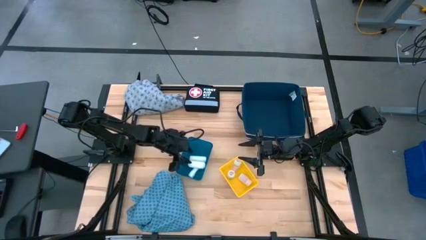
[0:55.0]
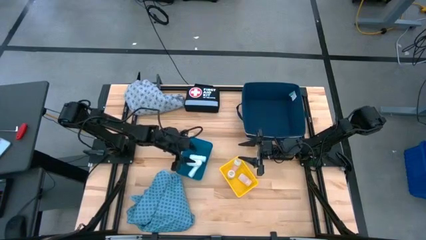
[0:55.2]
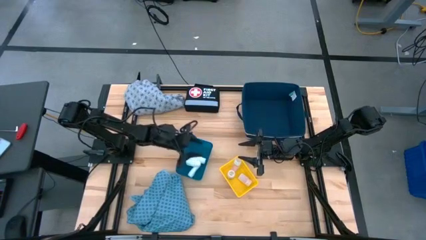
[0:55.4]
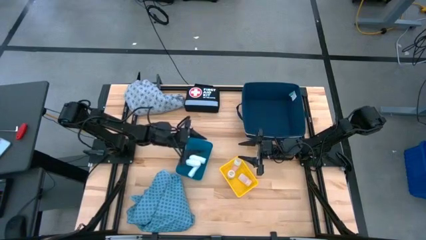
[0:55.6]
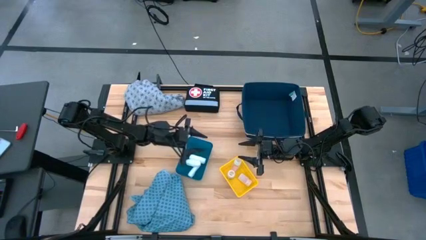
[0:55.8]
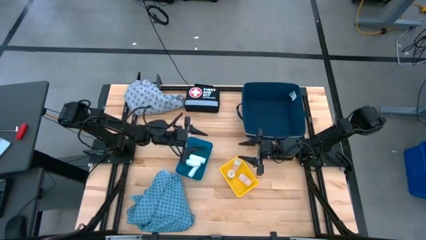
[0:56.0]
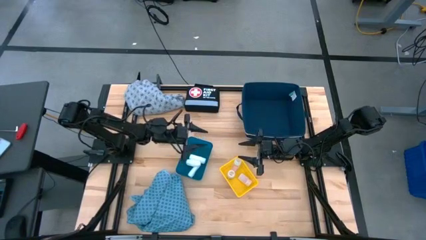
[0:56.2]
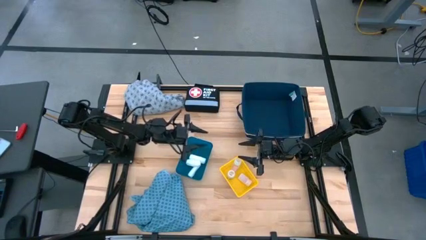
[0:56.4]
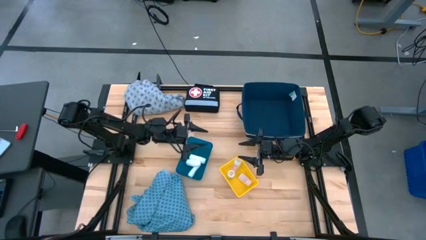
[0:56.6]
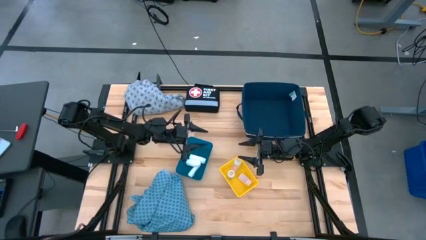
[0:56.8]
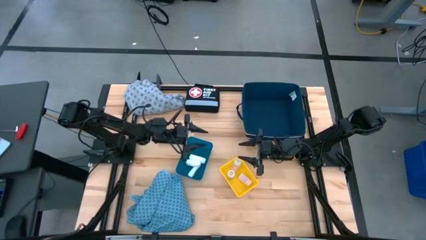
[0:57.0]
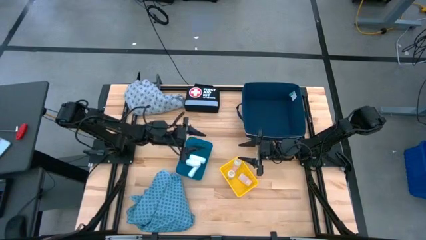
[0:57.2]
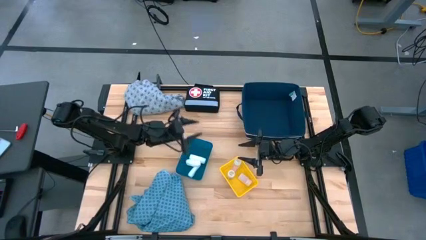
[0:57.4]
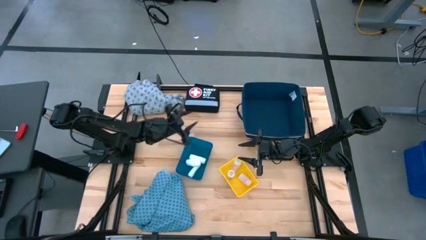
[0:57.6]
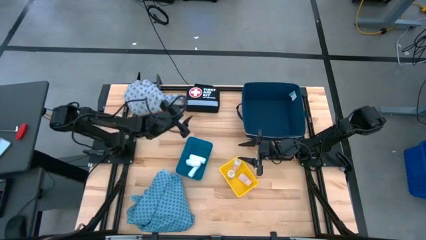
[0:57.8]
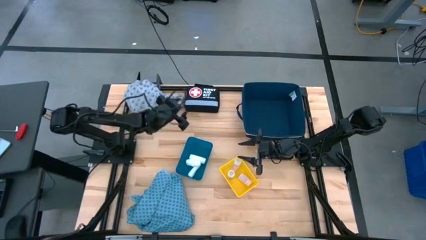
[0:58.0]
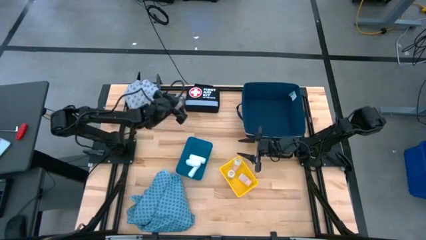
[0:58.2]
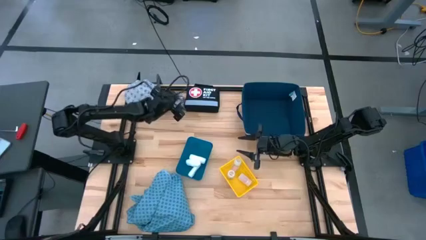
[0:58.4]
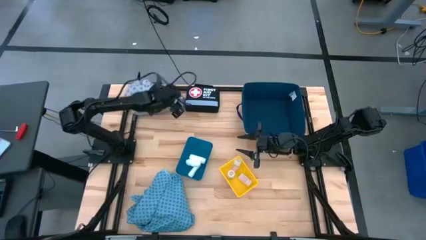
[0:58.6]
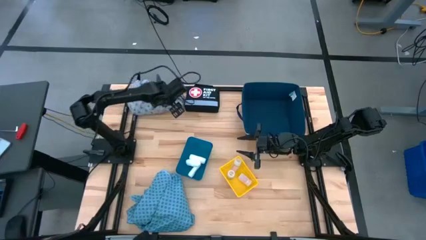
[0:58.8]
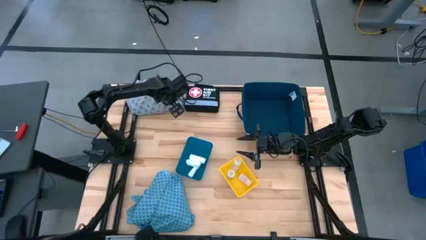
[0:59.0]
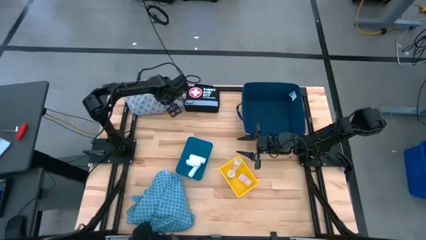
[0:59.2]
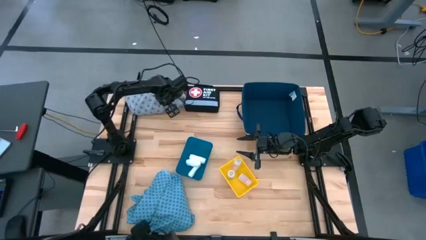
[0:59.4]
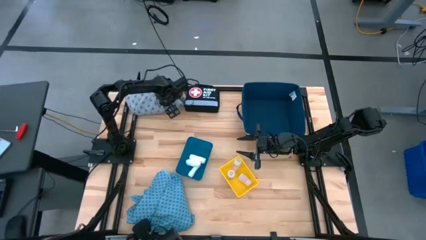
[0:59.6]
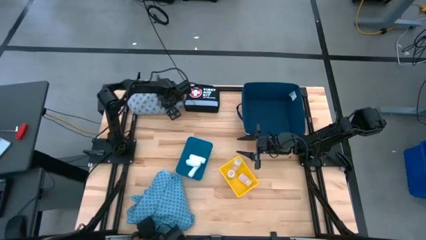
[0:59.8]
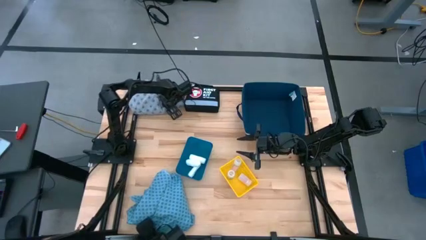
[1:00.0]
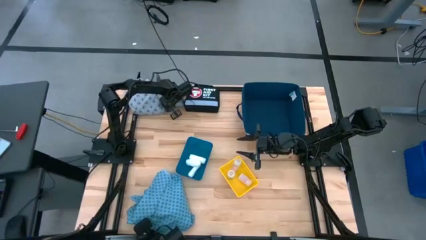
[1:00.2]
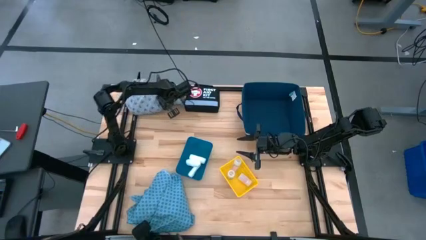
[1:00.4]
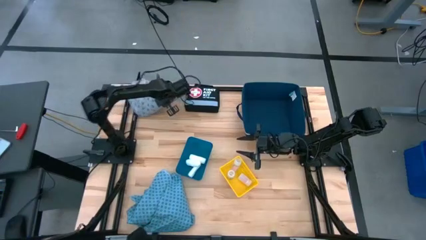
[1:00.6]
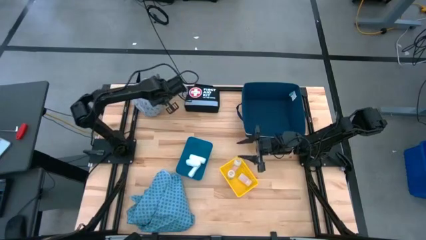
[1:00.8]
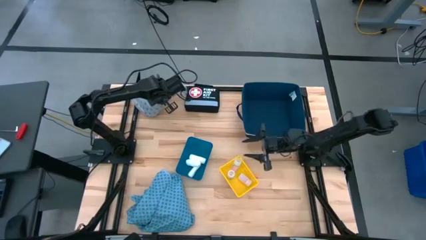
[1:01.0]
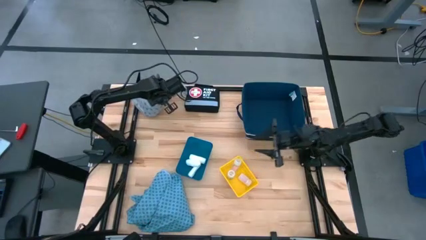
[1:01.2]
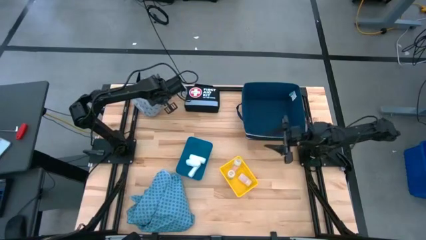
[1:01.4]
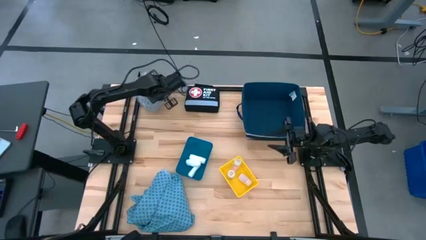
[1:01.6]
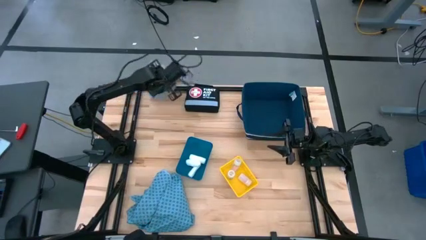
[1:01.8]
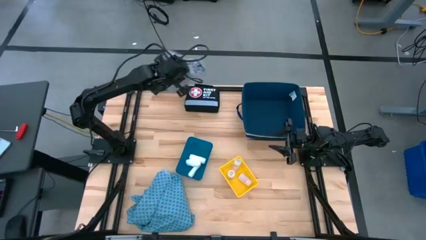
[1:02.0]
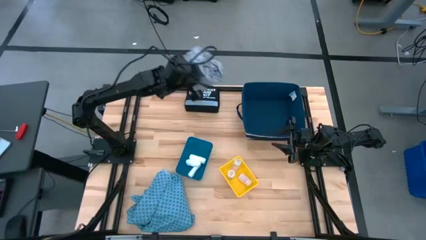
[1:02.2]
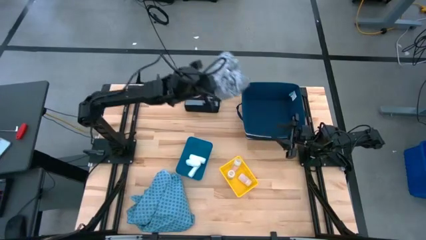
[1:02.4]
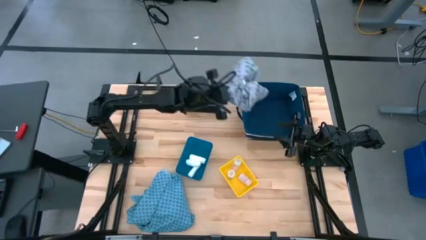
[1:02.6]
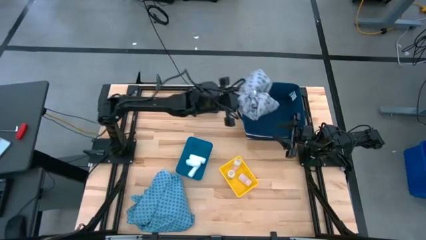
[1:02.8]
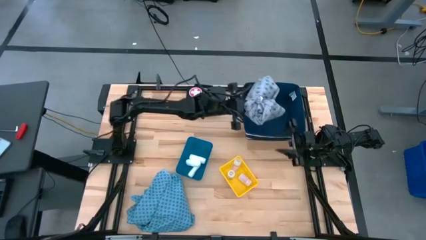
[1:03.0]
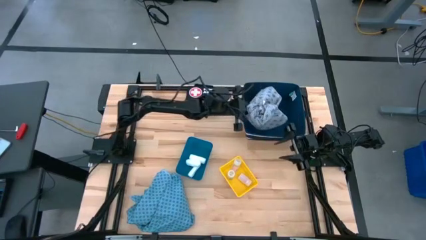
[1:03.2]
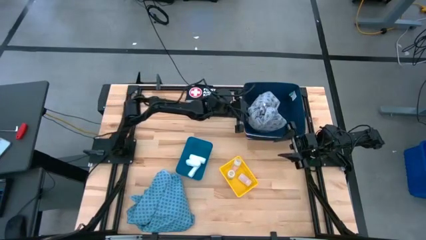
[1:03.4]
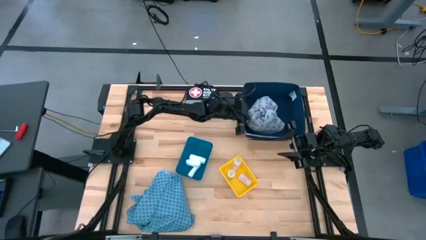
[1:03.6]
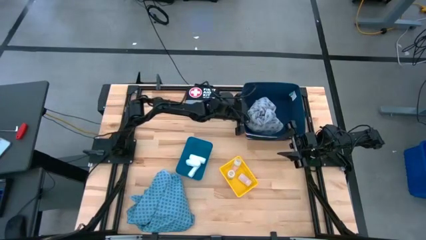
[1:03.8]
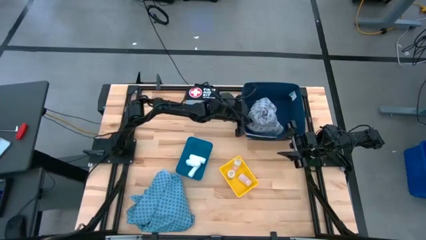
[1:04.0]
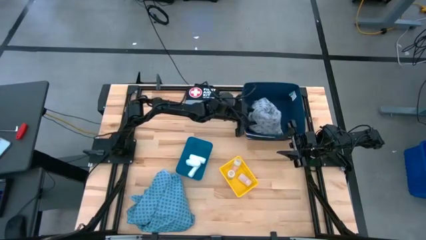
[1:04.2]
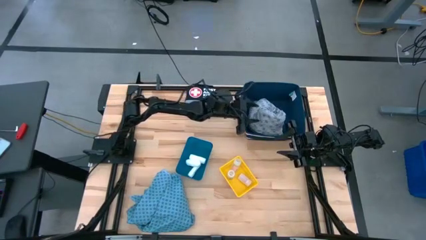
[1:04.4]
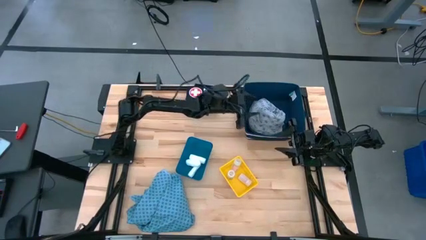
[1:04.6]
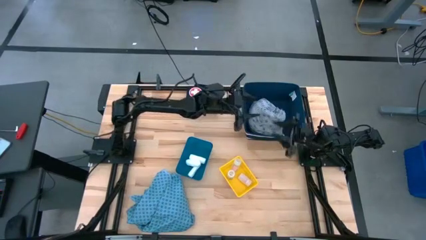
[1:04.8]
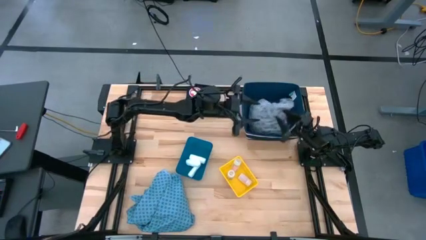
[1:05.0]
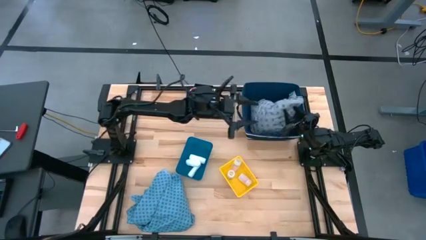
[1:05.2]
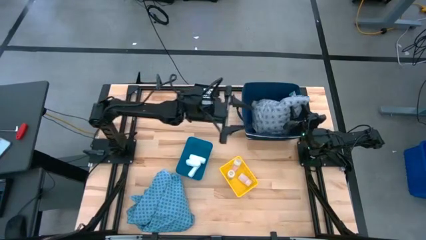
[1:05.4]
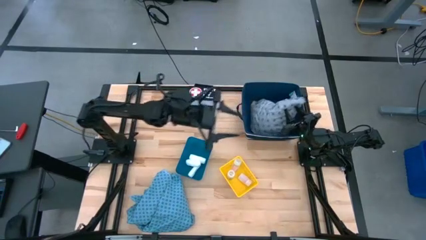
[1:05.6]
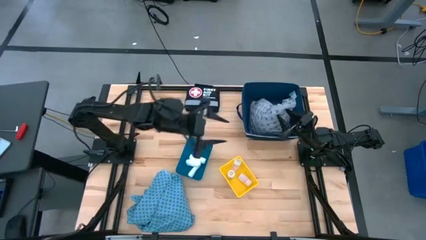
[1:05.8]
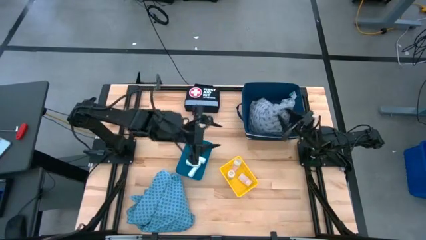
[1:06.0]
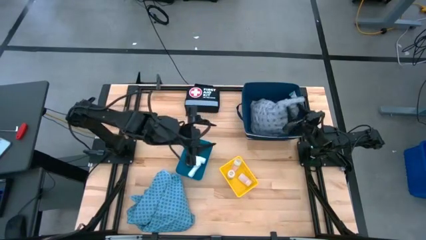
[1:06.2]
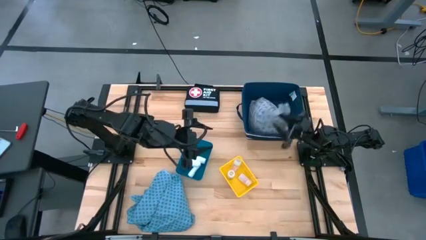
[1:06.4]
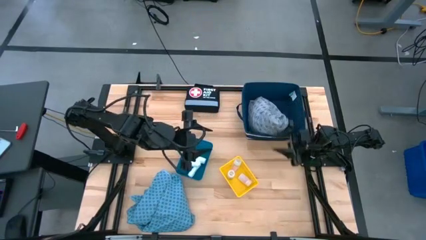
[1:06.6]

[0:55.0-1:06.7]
Task: Pick & place medical supplies in basket/bin
Put the gray patient gown into the blue laundry bin

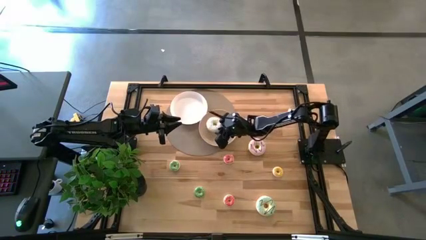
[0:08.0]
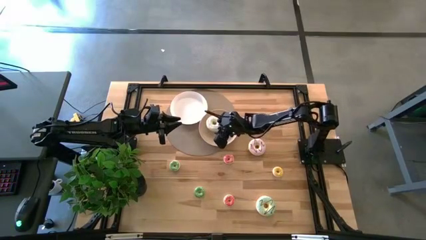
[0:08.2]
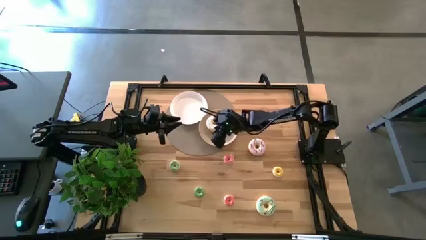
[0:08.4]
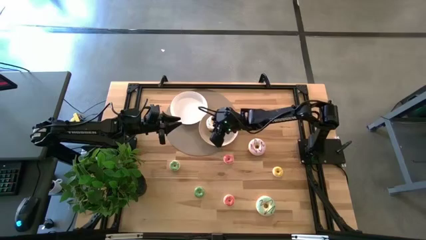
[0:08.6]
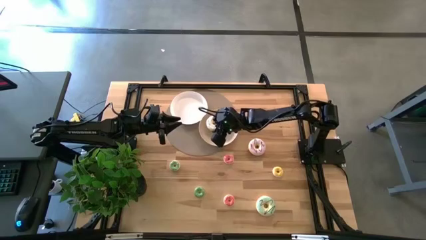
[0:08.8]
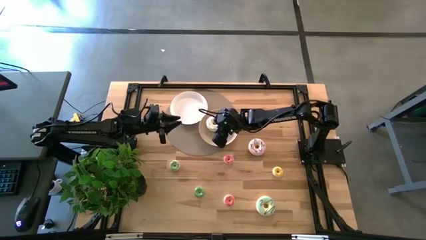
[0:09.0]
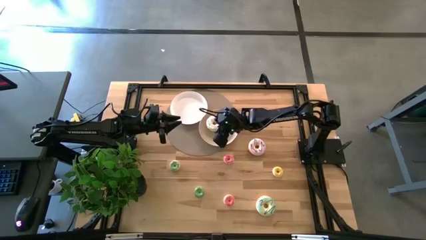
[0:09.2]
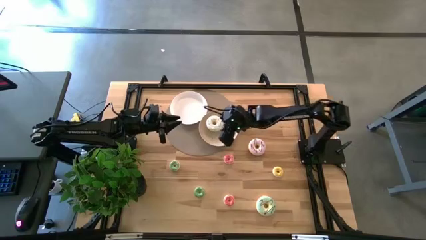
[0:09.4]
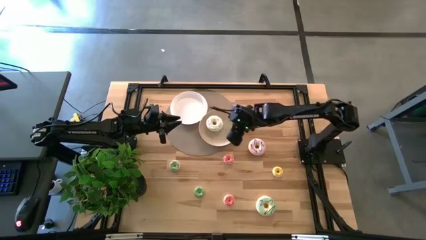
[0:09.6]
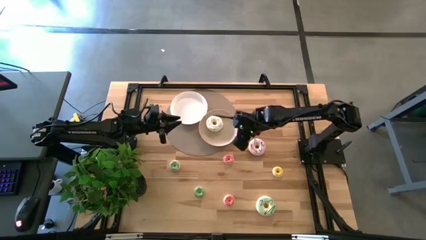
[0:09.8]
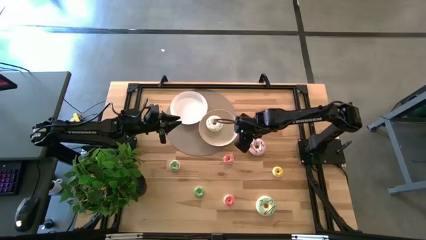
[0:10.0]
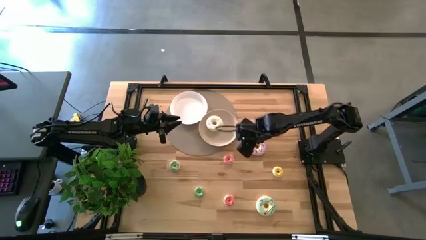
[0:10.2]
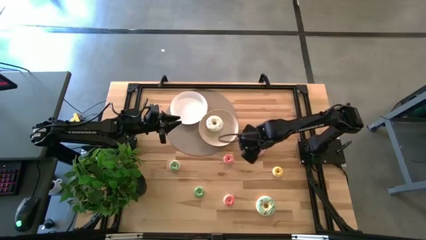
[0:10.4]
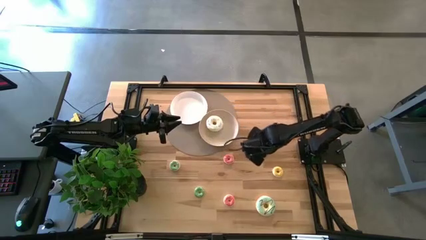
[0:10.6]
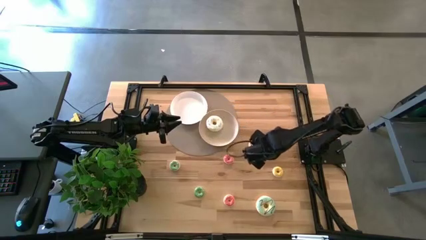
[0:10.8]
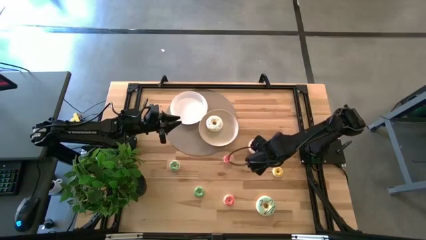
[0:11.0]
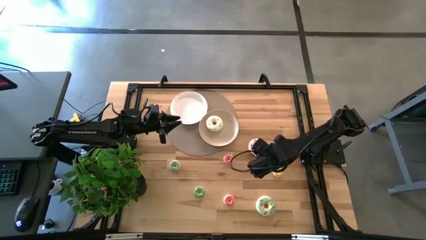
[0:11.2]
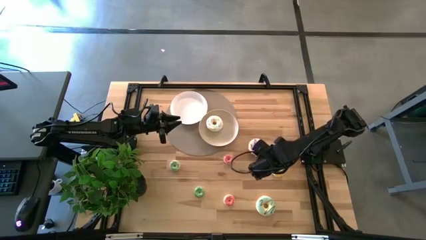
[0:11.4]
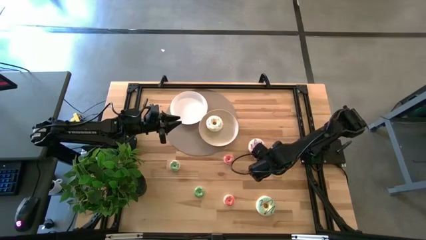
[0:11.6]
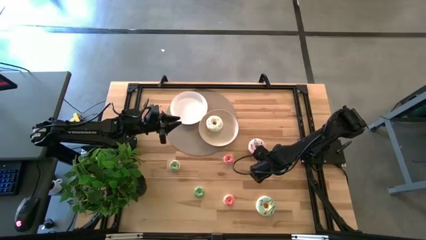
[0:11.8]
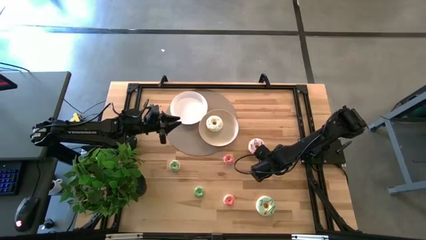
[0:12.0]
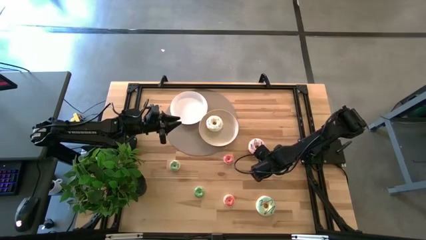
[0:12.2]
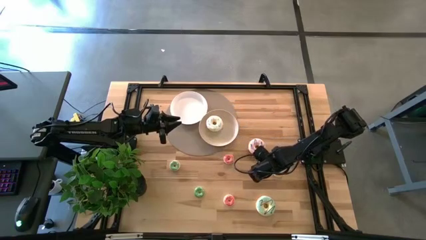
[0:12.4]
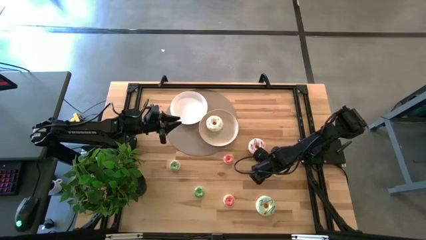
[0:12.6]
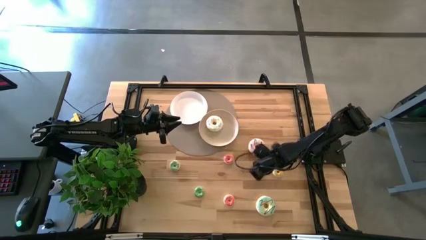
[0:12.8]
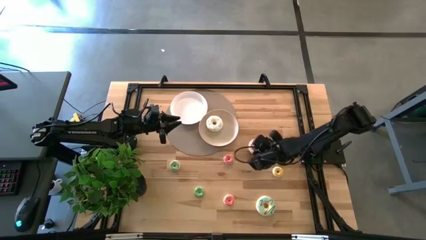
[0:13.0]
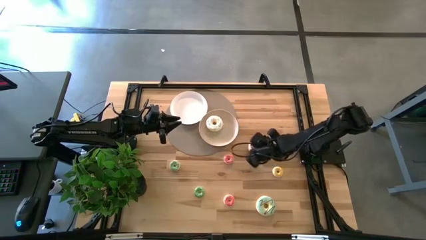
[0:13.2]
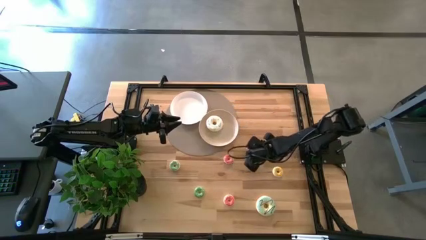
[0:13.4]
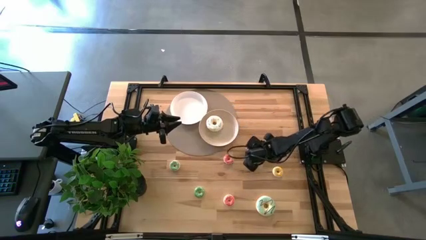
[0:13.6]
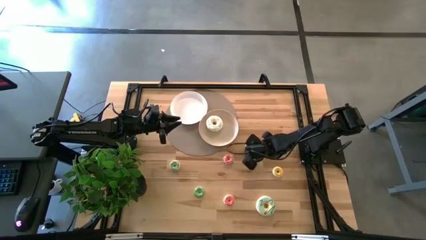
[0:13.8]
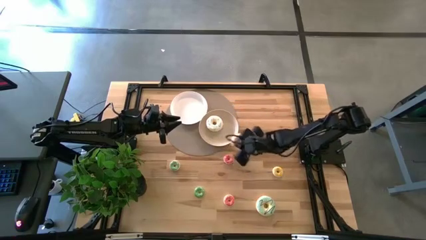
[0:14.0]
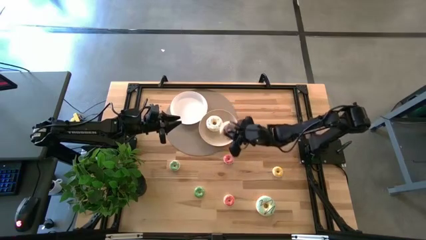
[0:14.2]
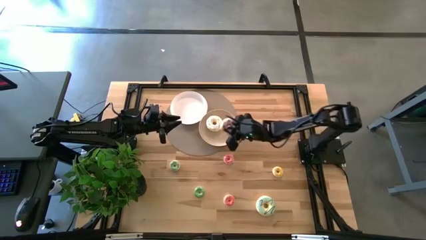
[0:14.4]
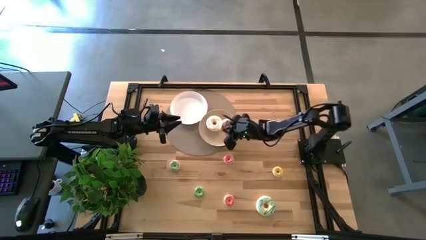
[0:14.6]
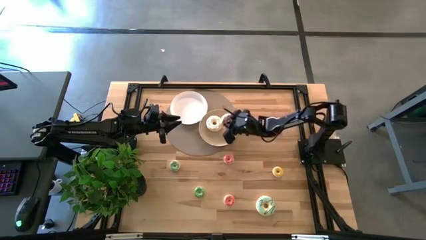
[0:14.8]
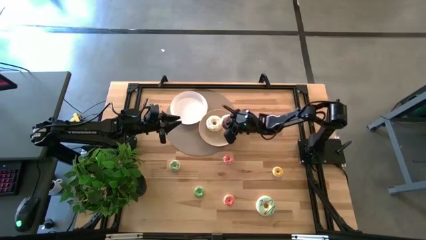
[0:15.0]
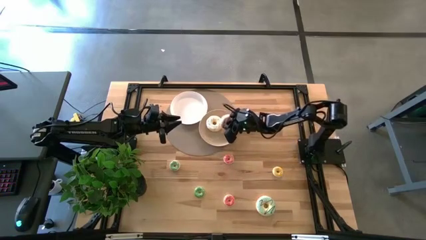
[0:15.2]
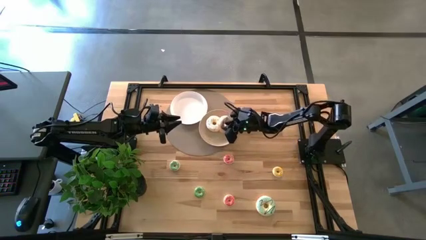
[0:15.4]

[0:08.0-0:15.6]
Task: Pick & Place donuts
Put the large purple doughnut on the brown plate
